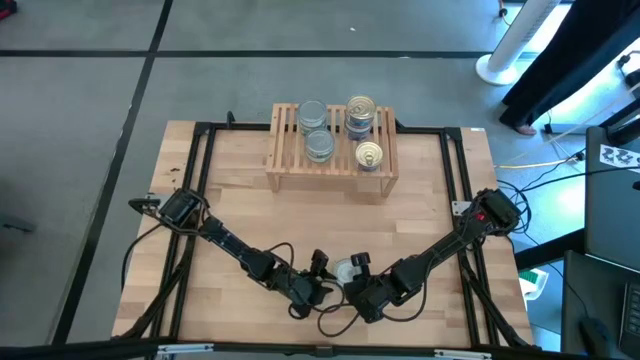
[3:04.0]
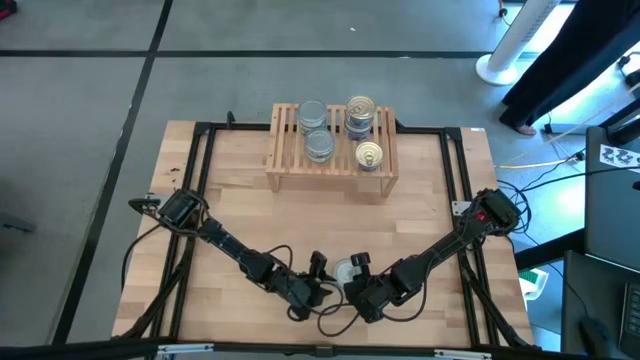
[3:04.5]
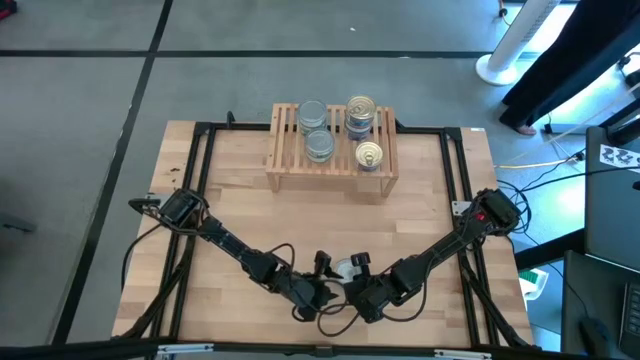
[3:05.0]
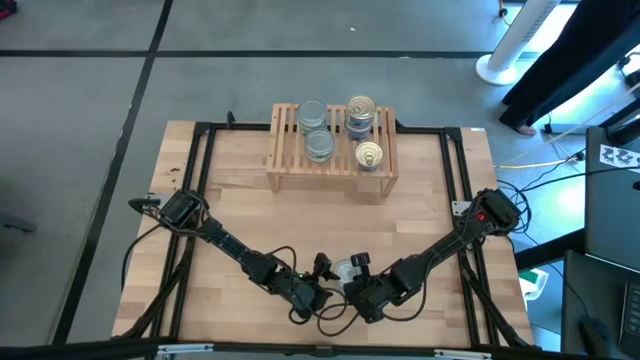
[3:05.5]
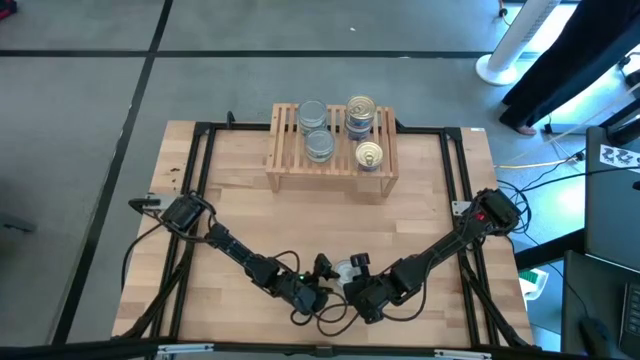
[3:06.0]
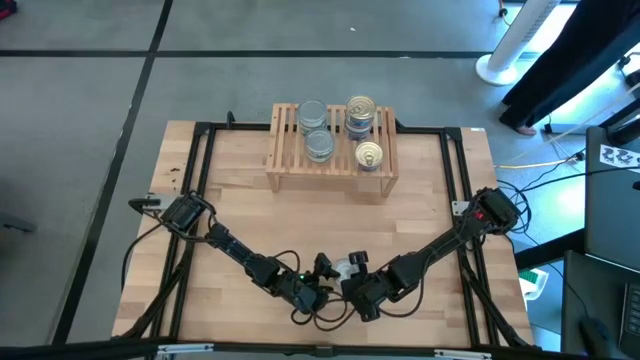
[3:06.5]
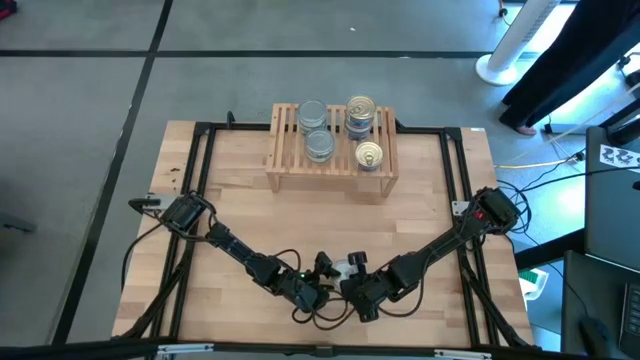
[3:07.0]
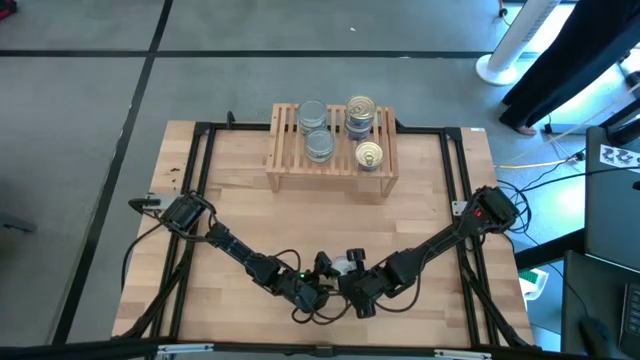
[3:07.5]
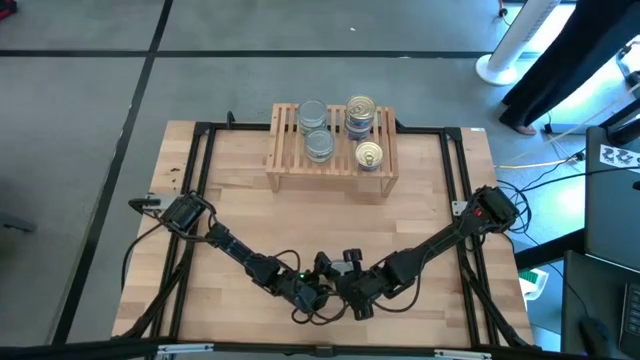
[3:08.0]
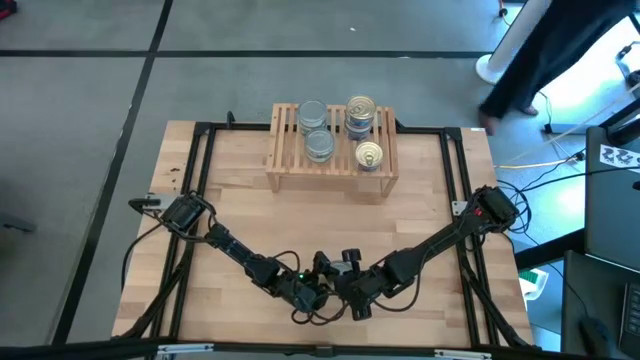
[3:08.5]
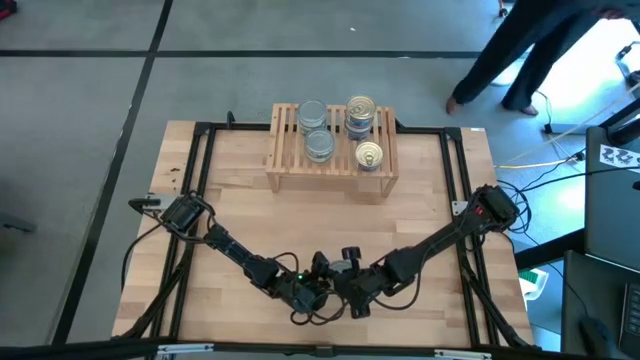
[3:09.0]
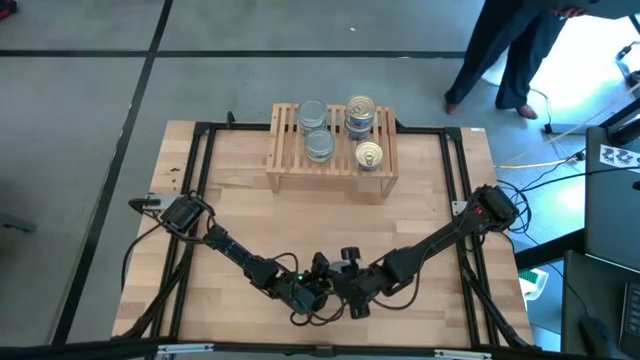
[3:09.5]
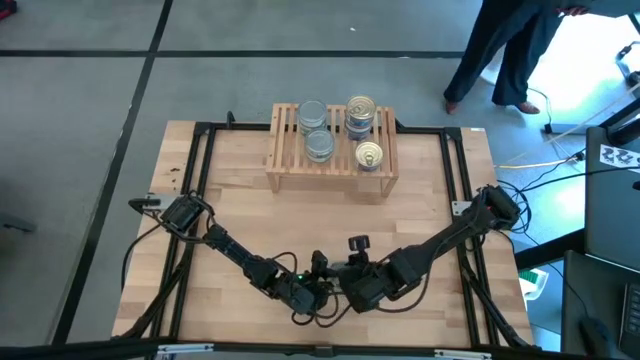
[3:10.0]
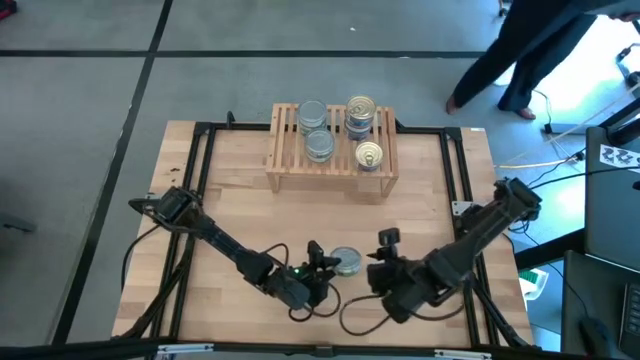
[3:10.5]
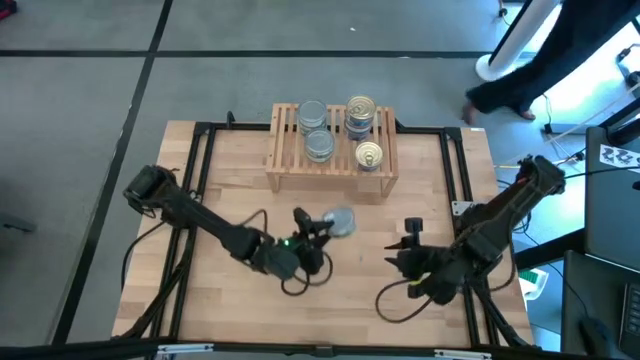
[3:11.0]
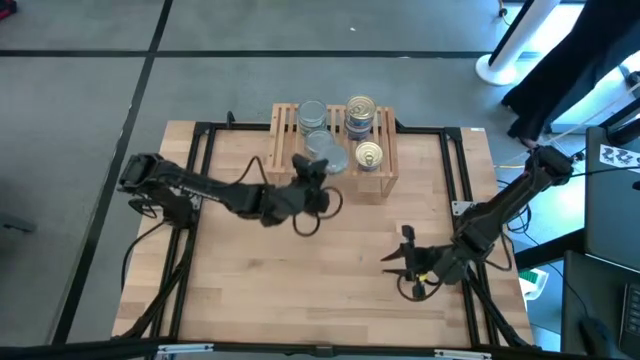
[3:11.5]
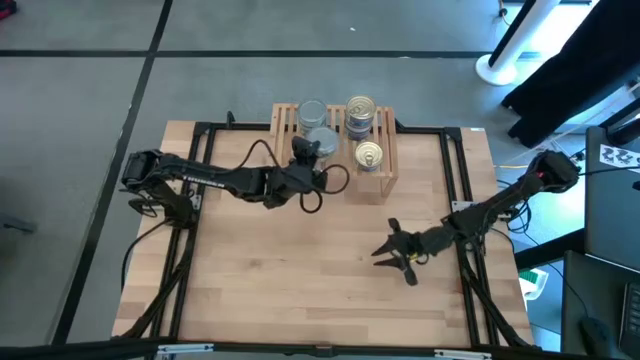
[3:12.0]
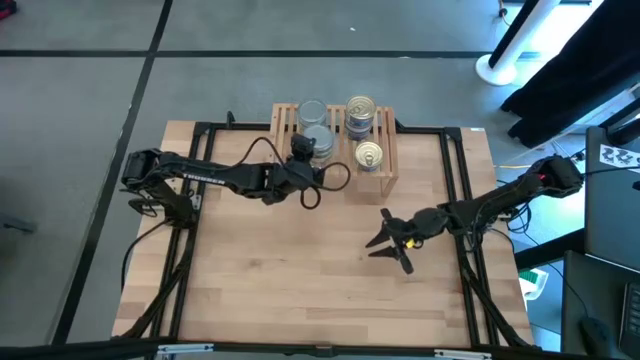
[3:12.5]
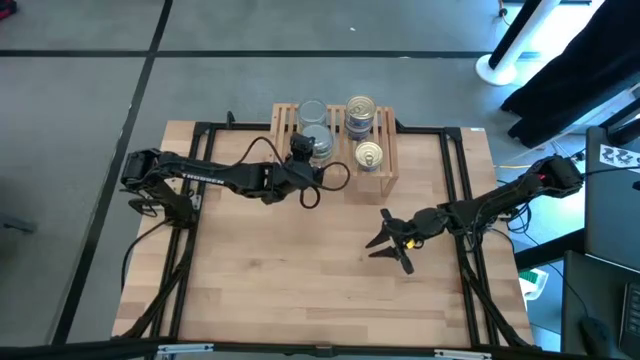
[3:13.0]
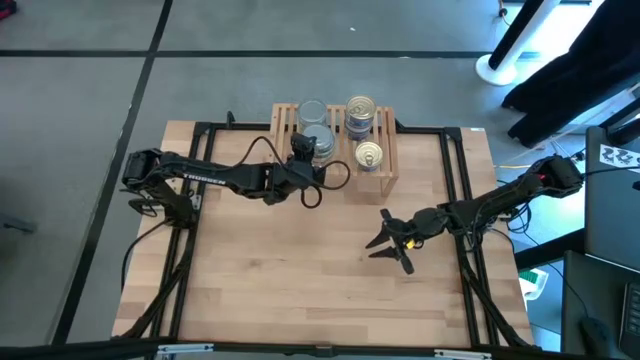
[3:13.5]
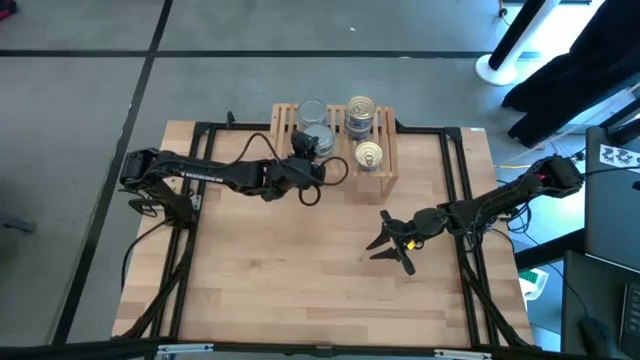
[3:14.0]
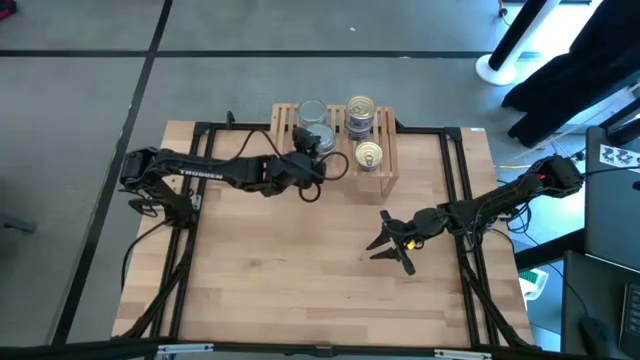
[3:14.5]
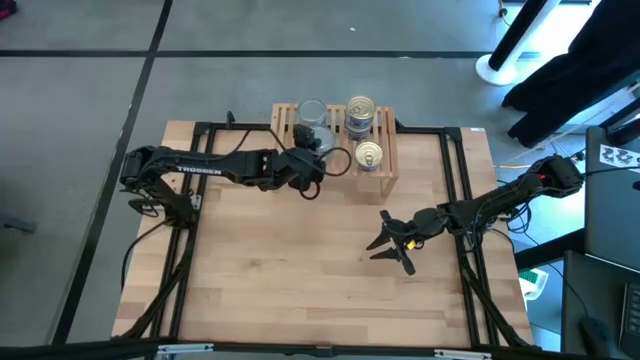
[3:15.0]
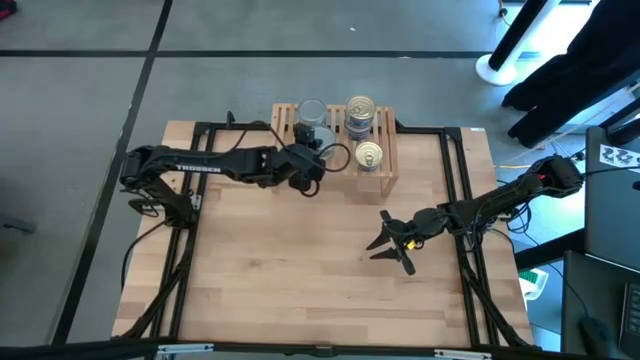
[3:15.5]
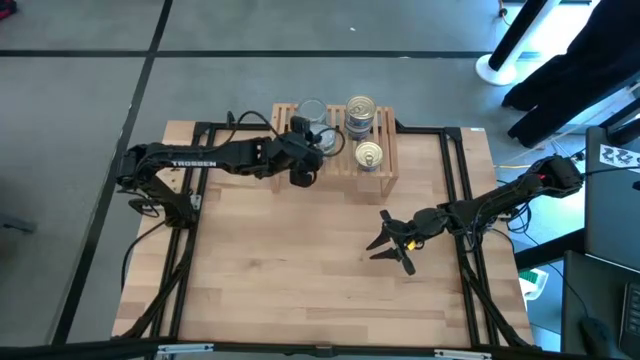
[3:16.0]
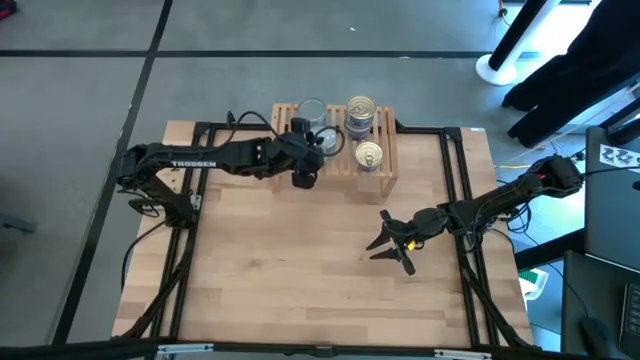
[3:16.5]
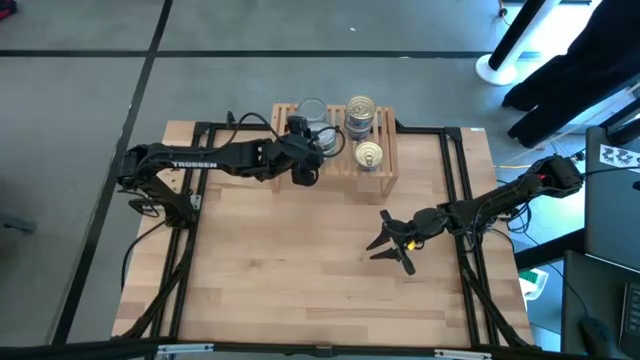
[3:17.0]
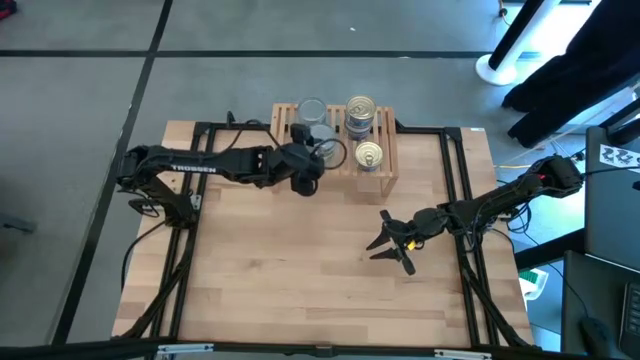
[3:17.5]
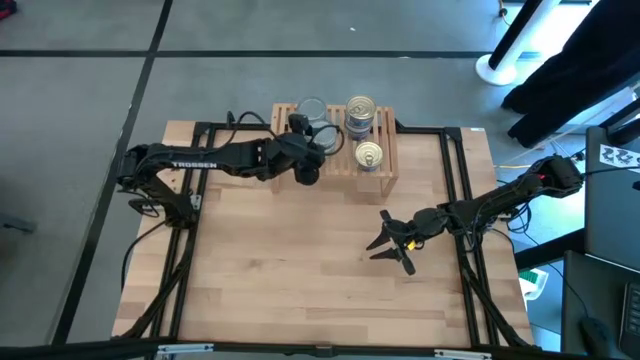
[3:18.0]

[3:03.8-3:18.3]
Task: Stack canned seafood by type on shelf
Stack the green white tuna can on top of the green white tuna can on the shelf

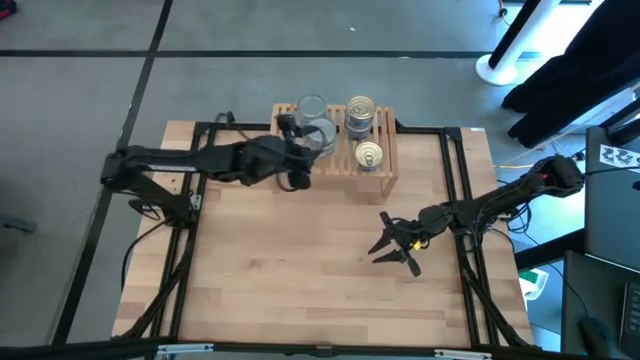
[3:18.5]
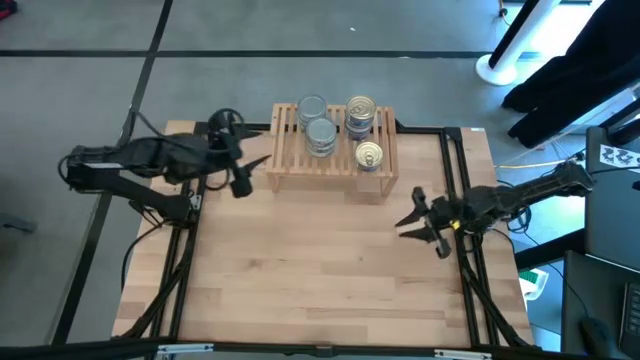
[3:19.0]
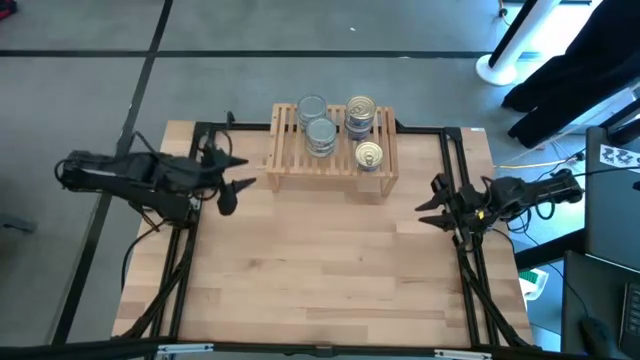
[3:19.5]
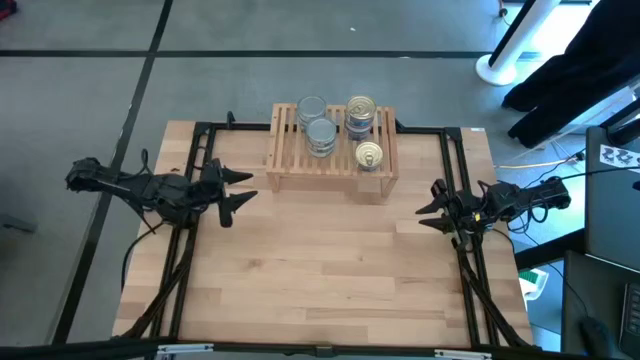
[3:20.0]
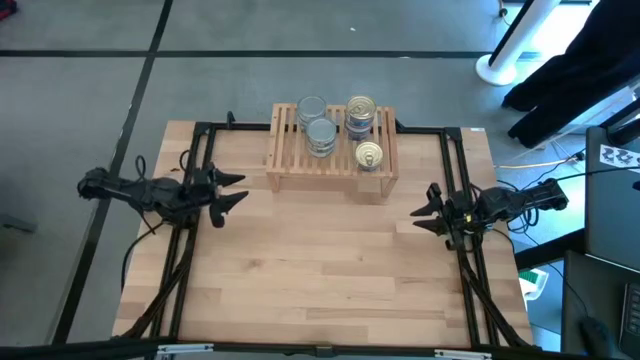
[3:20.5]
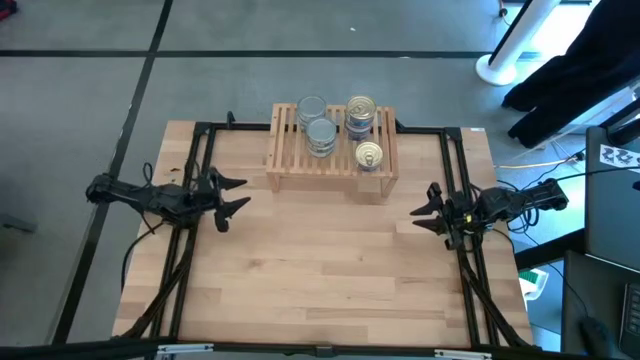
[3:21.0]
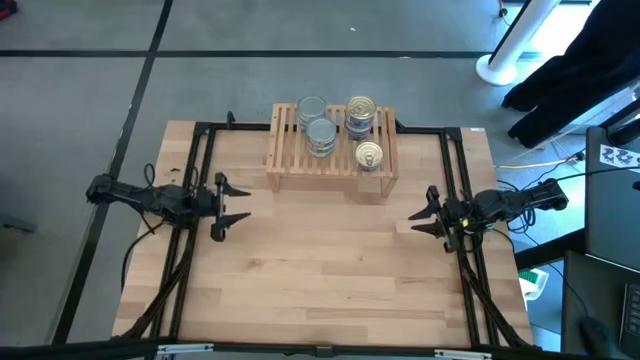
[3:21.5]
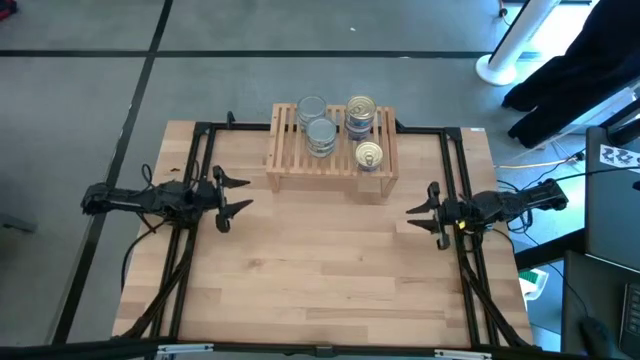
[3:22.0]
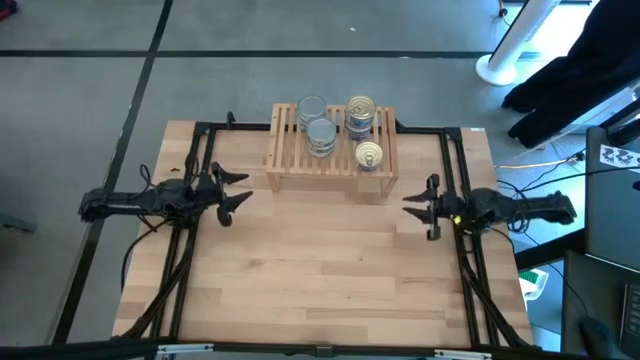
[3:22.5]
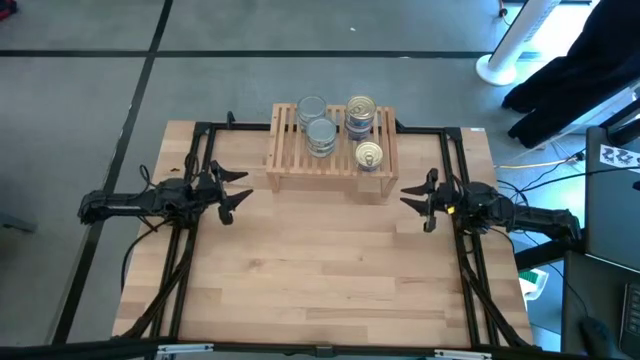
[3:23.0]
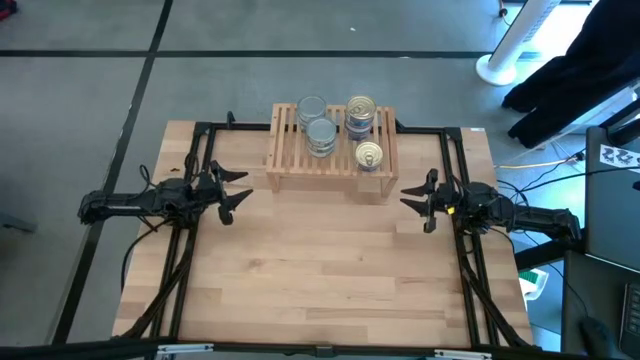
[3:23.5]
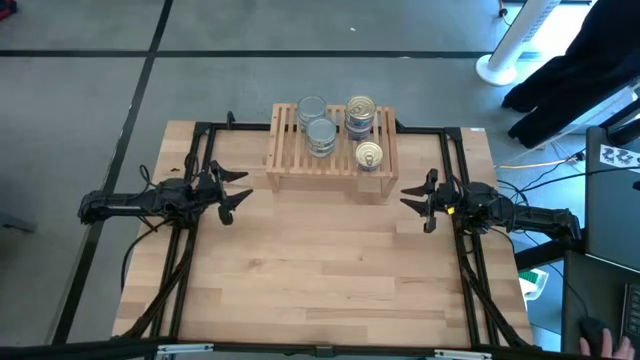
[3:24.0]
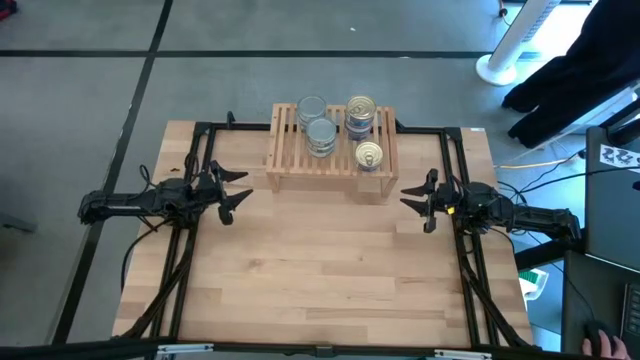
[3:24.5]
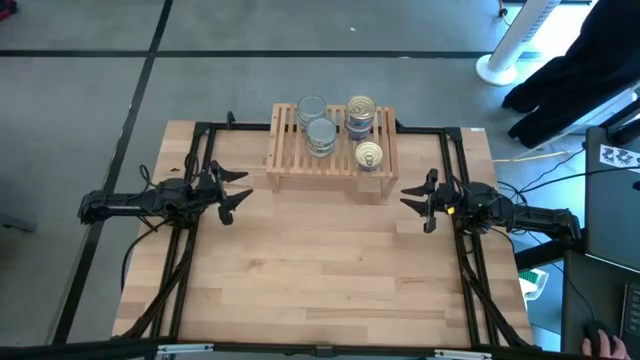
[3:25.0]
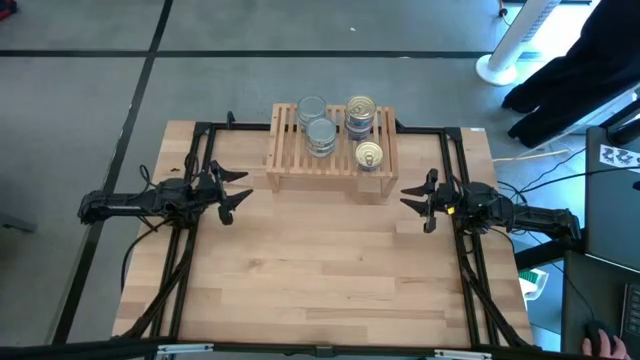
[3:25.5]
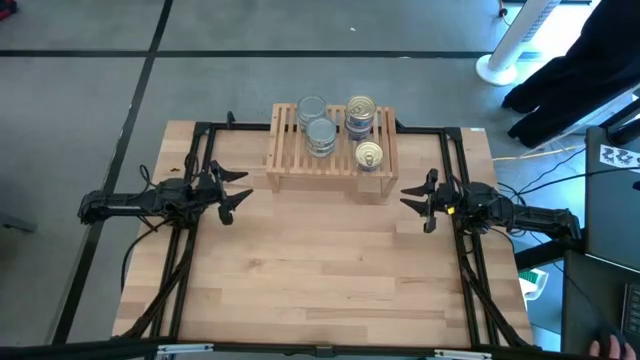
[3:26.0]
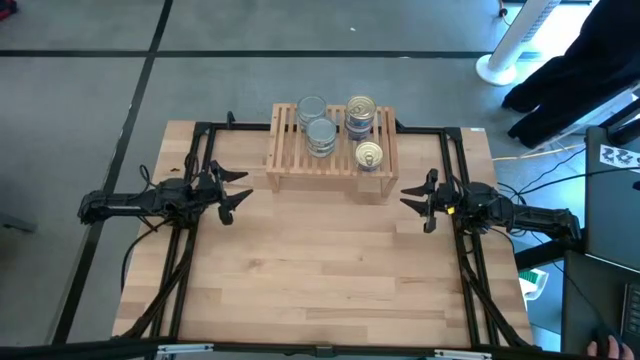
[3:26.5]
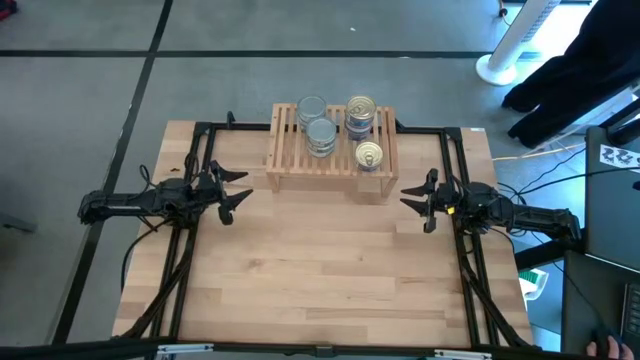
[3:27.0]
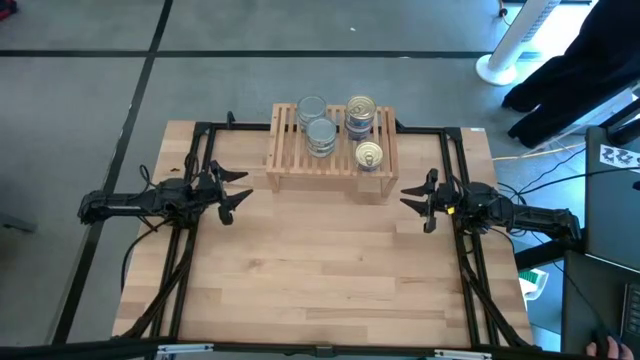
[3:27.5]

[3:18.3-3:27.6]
Return to Home Position
